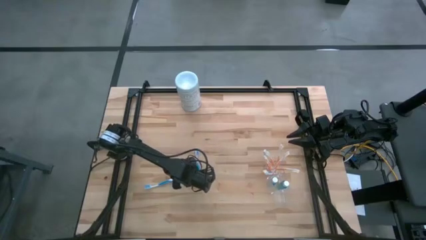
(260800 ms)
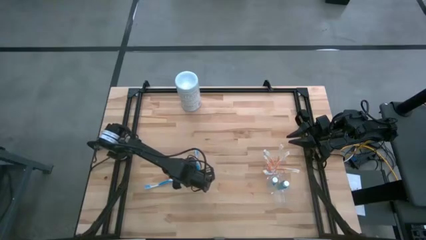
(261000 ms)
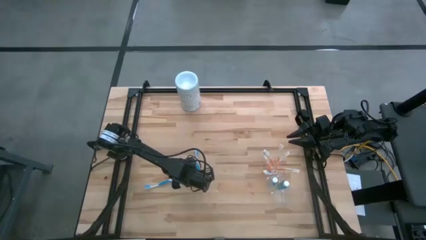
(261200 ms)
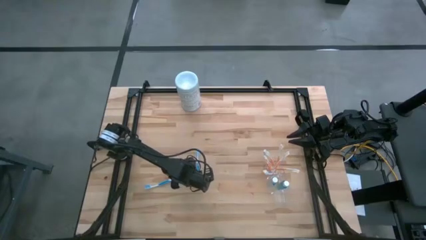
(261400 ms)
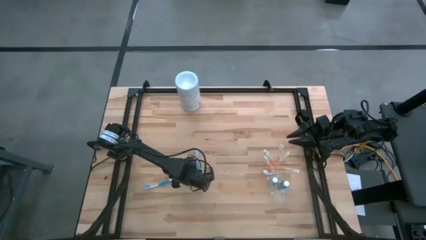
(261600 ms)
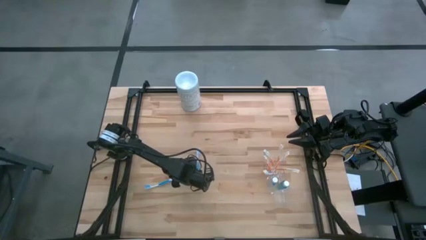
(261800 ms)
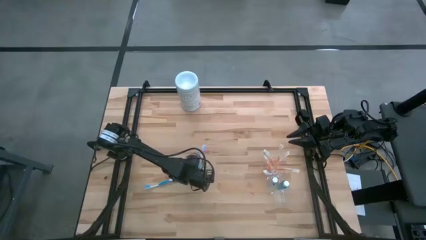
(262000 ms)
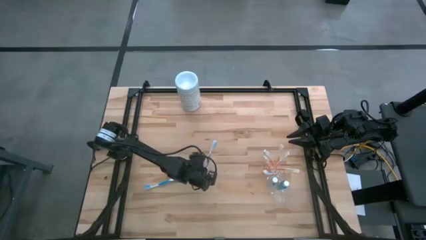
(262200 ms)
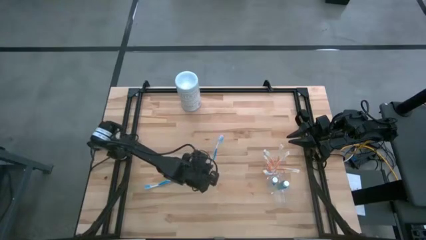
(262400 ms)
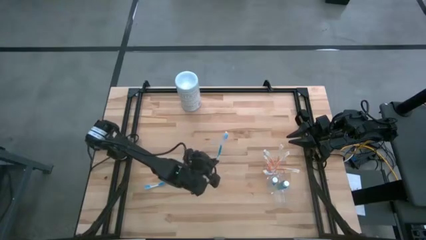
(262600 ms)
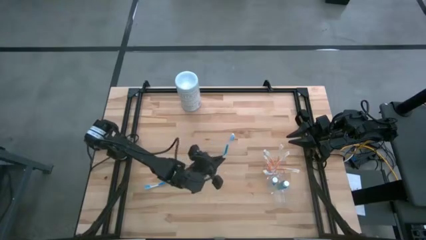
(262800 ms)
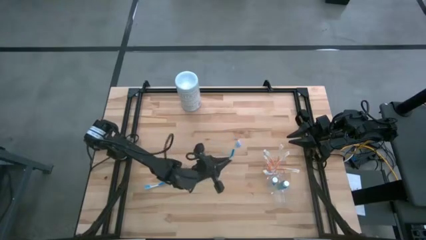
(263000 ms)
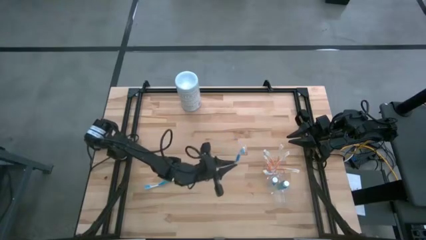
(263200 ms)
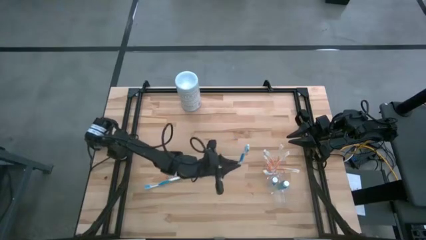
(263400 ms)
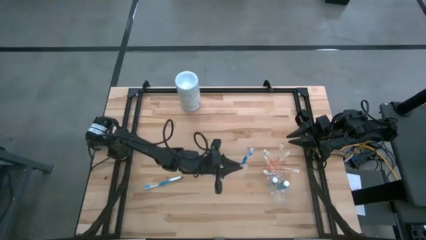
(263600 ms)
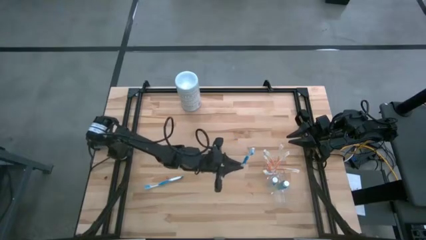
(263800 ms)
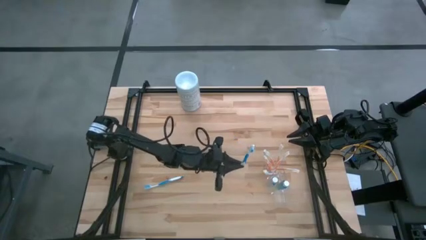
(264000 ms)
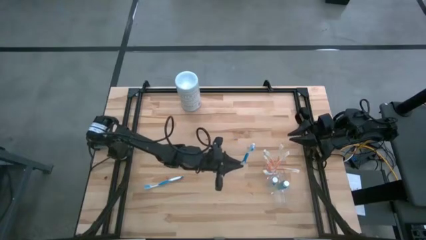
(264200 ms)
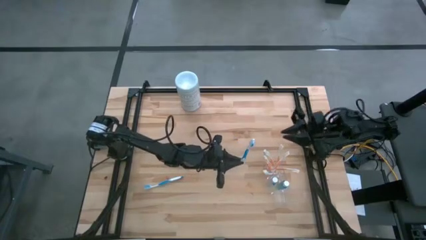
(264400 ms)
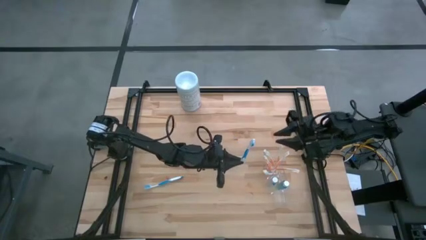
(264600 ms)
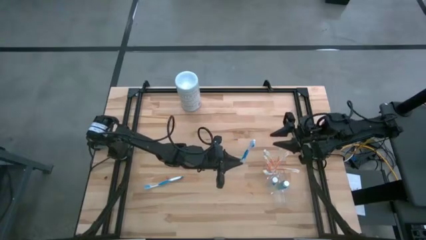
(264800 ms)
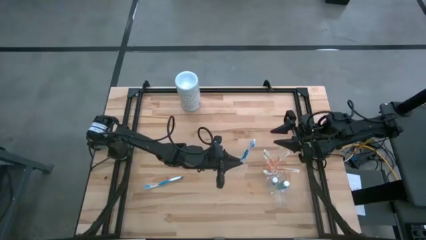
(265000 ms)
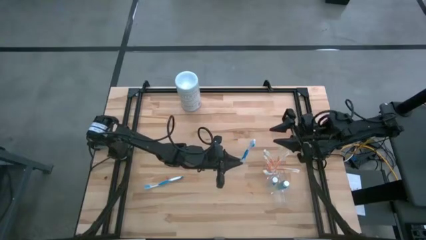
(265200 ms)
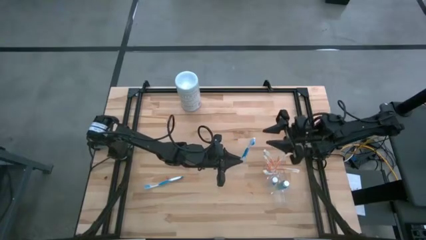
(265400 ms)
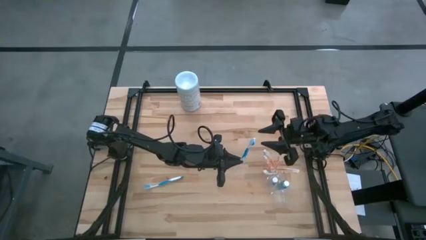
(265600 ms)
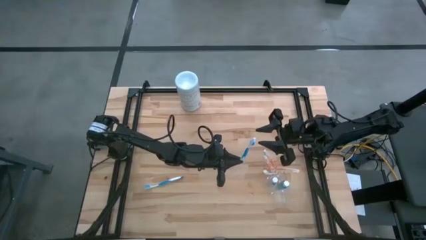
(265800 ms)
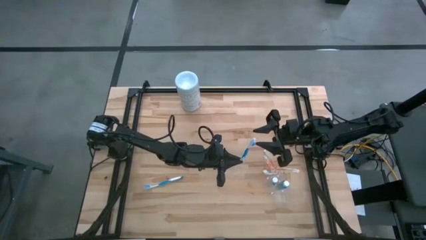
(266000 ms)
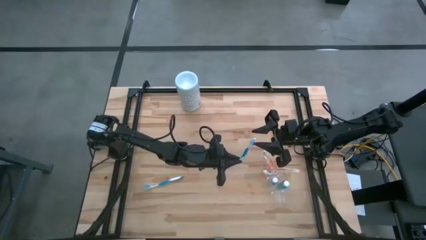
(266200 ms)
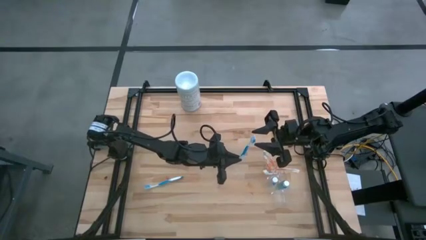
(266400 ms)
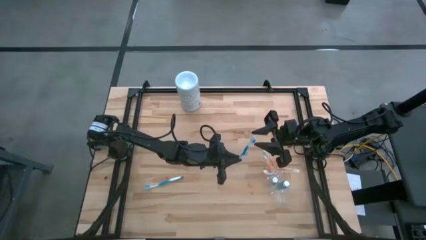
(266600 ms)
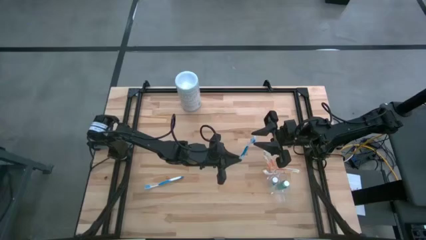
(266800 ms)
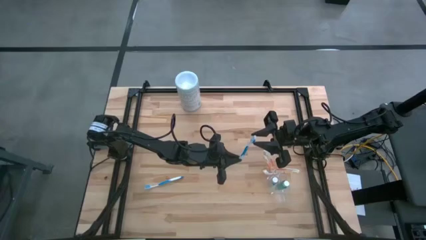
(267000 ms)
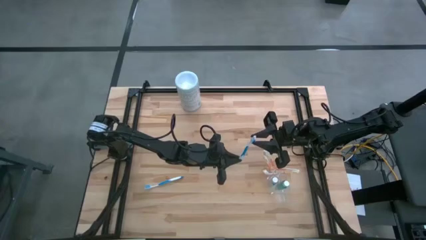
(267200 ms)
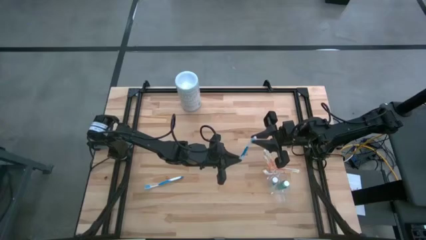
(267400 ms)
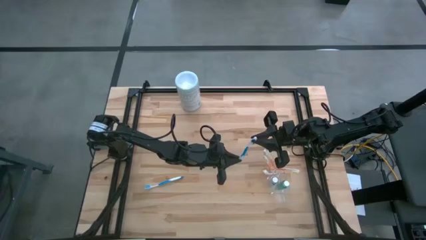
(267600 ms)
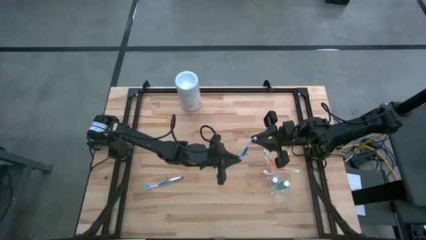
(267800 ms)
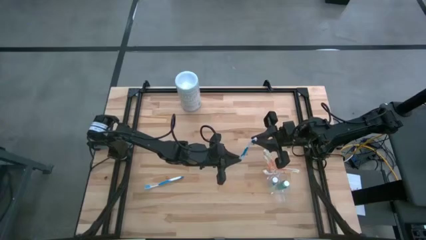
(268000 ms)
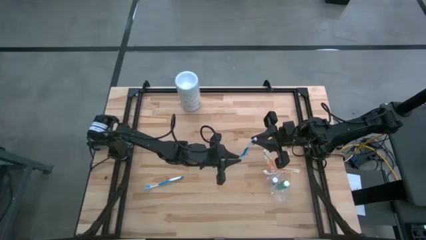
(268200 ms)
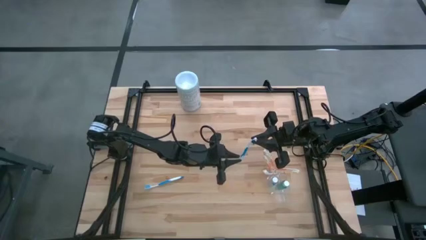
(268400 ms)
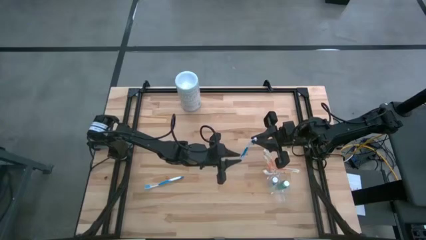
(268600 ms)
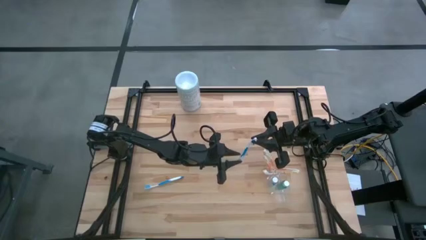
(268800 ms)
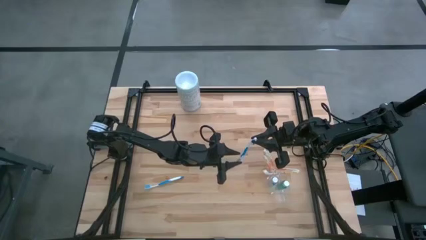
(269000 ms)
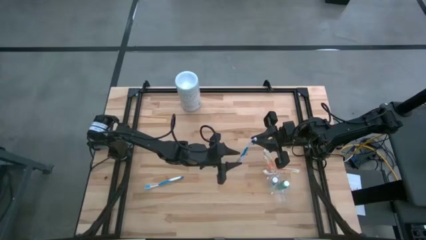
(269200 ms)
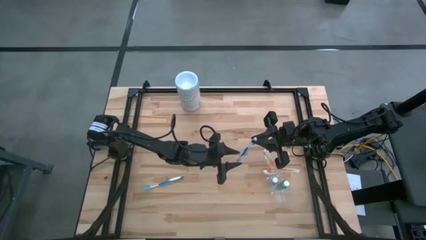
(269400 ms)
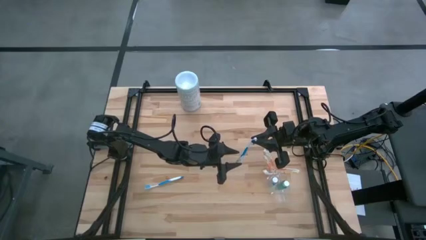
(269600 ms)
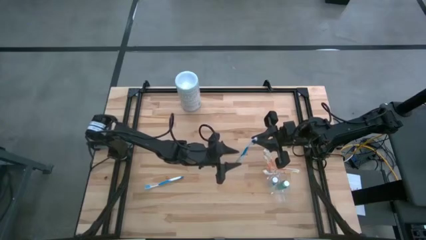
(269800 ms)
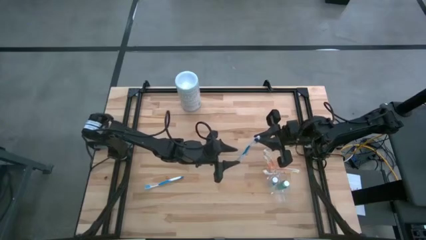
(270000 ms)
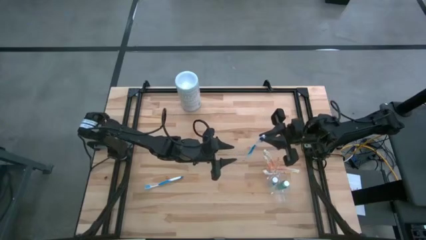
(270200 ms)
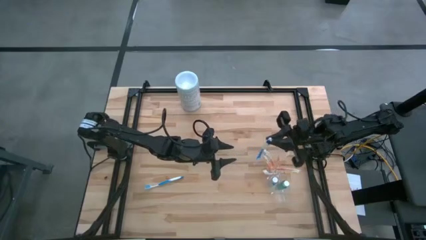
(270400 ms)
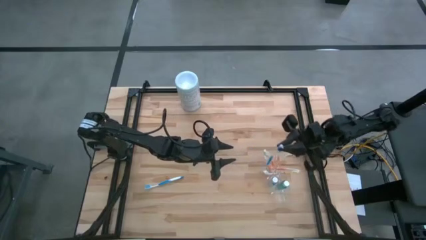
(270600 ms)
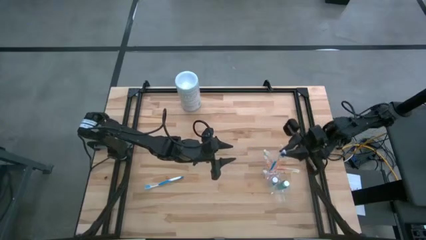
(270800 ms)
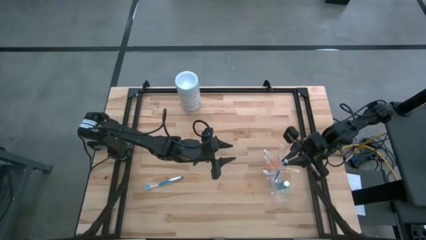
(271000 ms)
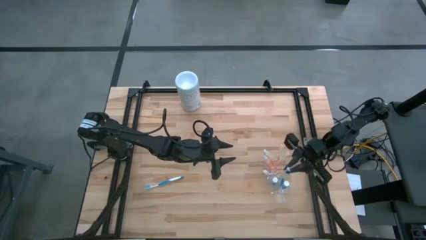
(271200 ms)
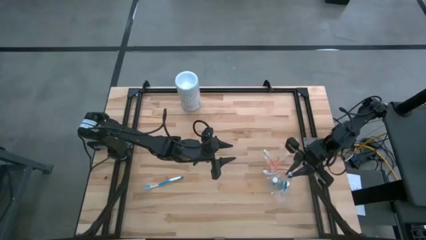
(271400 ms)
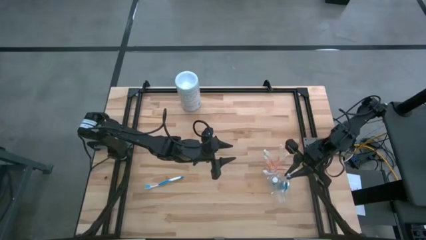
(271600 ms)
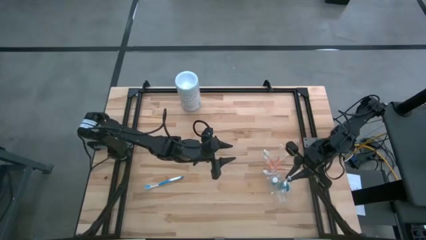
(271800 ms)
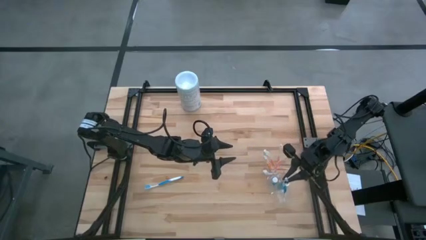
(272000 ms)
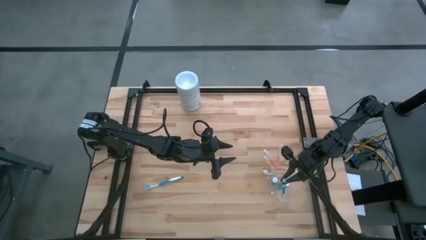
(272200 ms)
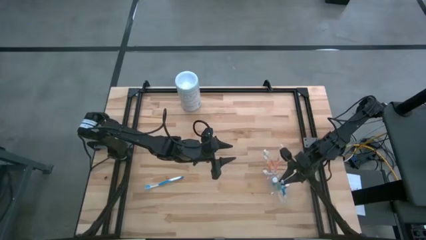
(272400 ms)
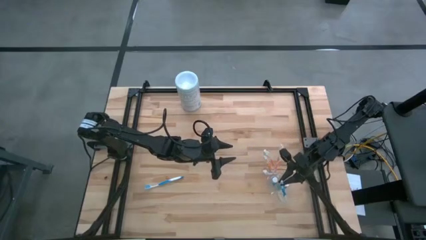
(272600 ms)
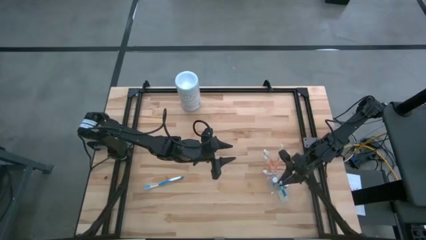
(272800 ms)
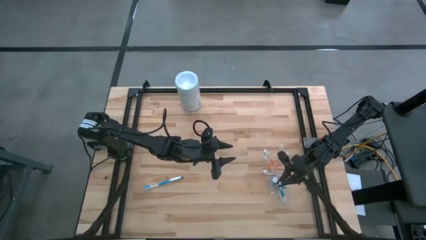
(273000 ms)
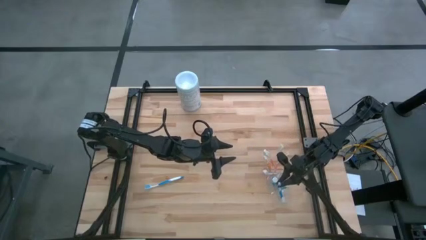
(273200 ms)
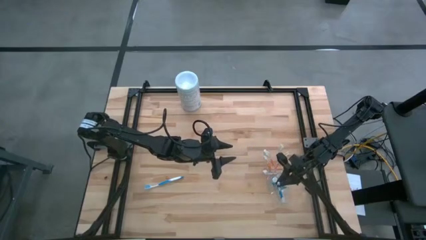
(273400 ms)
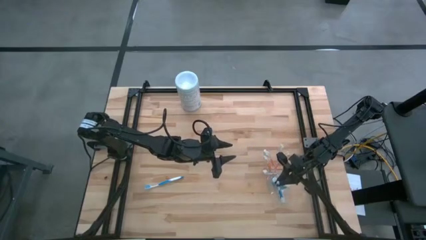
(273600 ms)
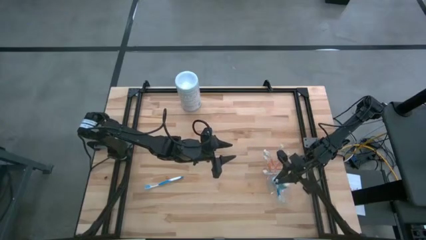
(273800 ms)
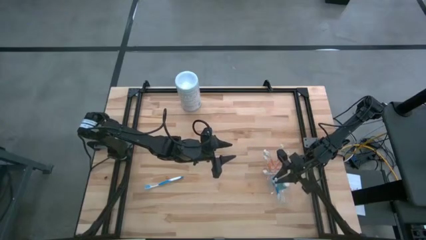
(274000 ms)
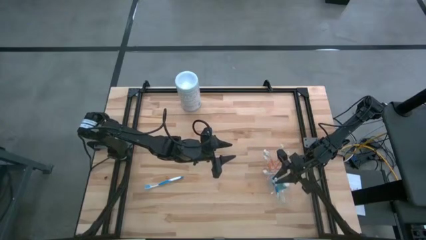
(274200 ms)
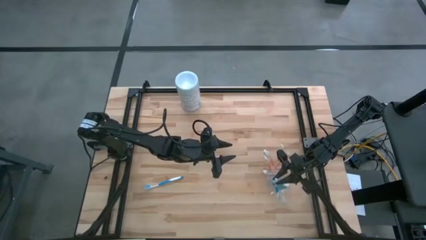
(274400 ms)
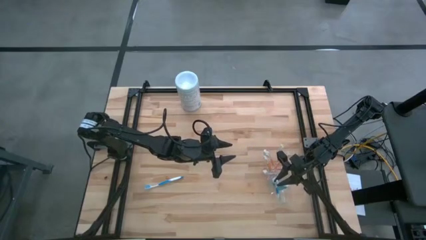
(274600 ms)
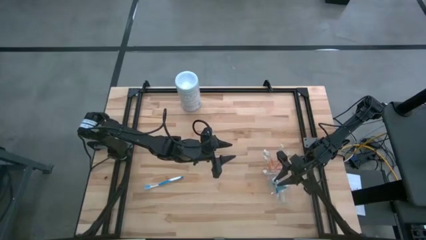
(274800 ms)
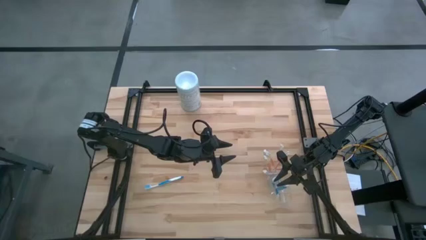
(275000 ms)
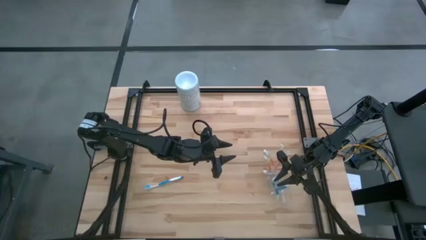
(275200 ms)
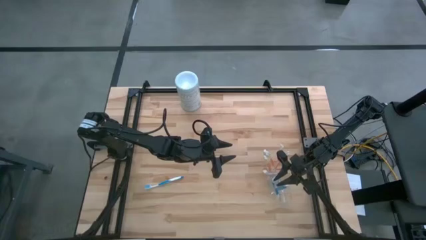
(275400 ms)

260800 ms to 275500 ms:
Task: Pick & Place toothbrushing station
Put the blue toothbrush into the bottom section of the transparent organizer

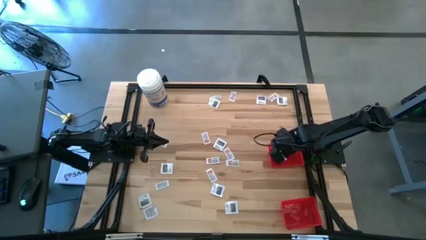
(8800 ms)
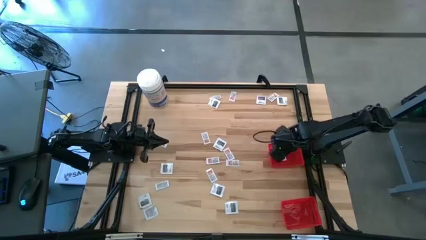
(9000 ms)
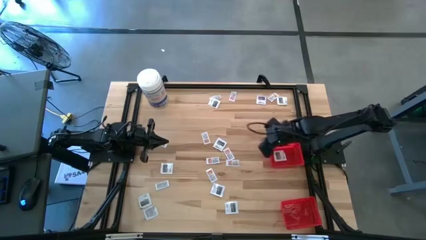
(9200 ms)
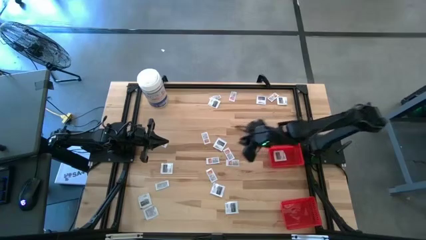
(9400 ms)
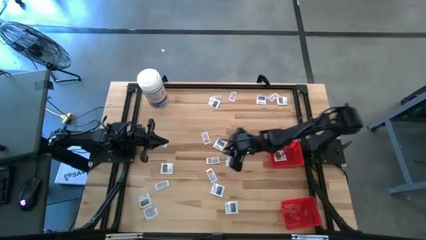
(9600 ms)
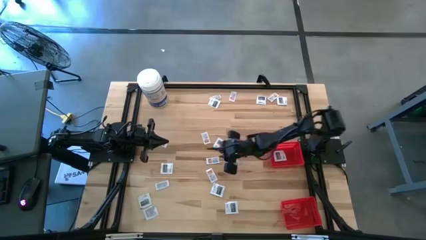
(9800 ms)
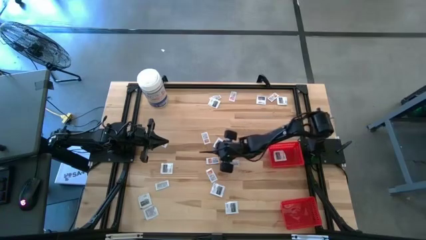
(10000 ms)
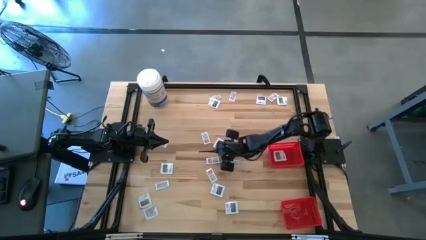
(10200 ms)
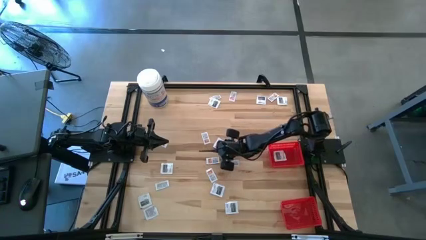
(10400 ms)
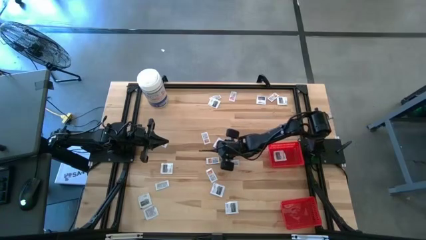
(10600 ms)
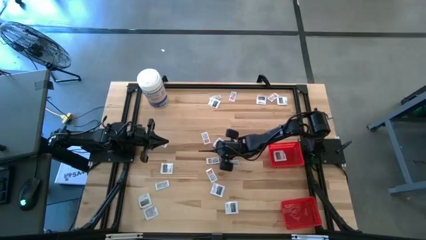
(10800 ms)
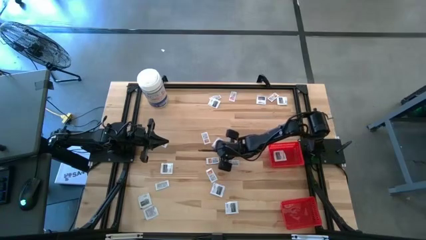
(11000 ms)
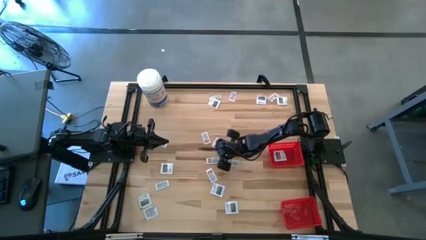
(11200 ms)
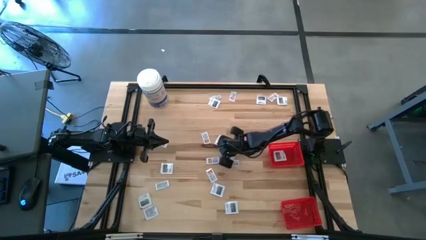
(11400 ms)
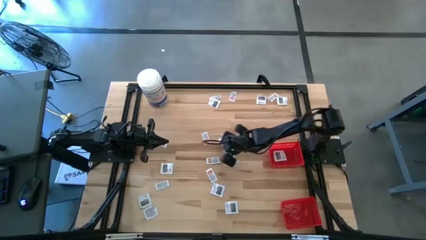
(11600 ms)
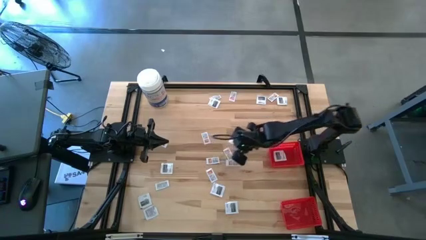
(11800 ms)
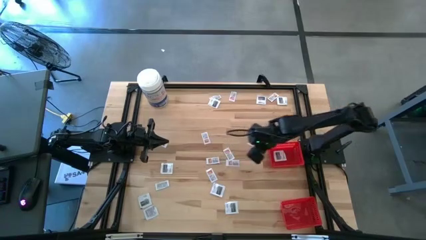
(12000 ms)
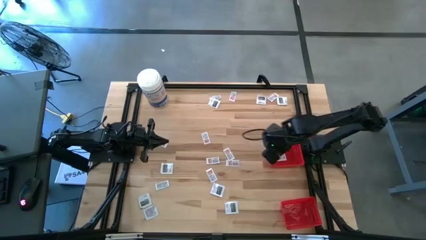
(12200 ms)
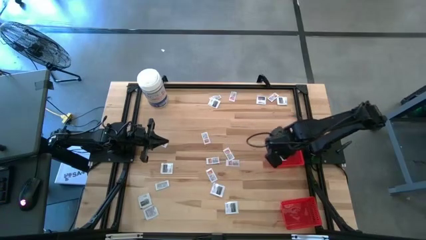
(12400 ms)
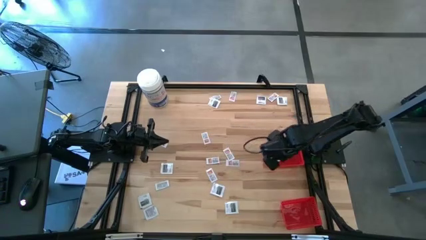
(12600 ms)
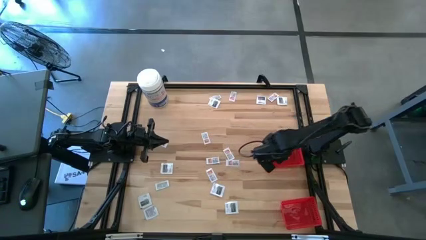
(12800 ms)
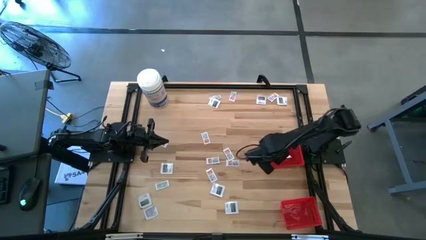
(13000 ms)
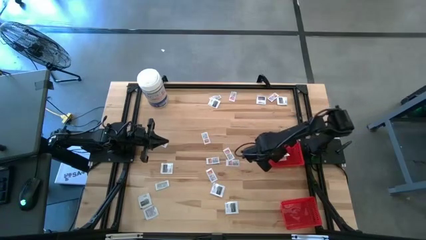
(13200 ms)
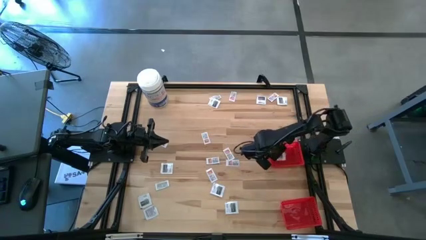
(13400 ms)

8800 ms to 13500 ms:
Task: Pick & Place First Aid Supplies
Put the black towelette pack into the top red basket
